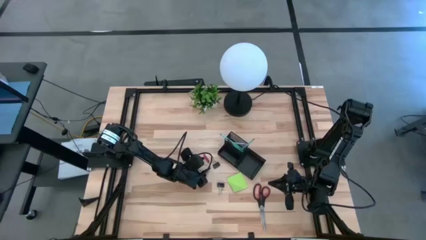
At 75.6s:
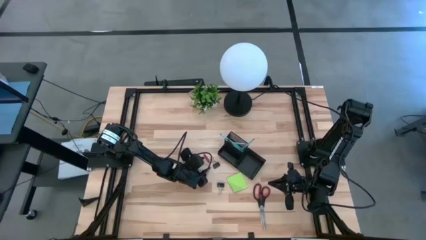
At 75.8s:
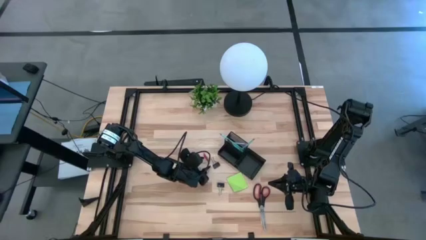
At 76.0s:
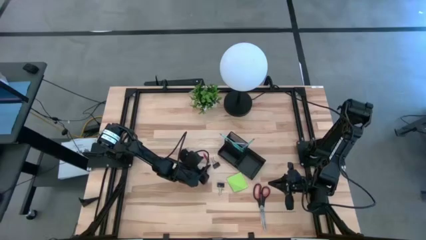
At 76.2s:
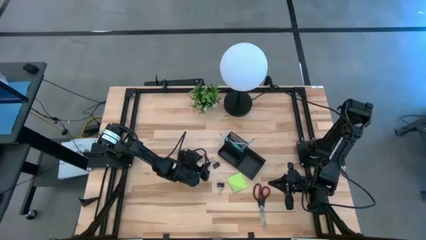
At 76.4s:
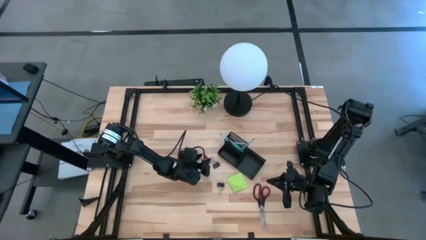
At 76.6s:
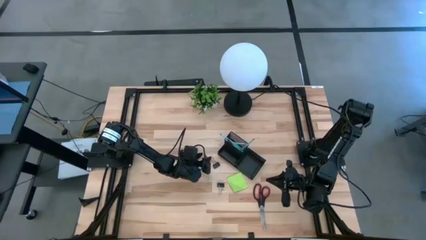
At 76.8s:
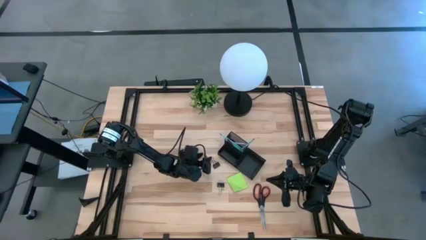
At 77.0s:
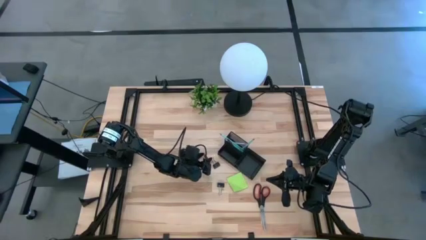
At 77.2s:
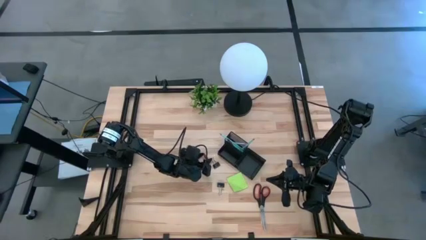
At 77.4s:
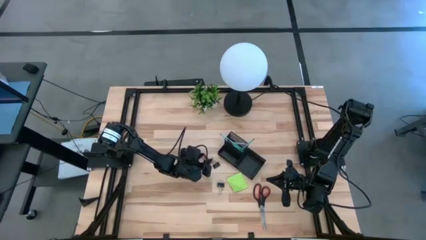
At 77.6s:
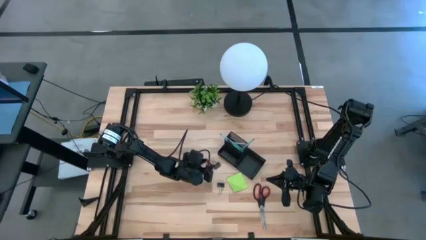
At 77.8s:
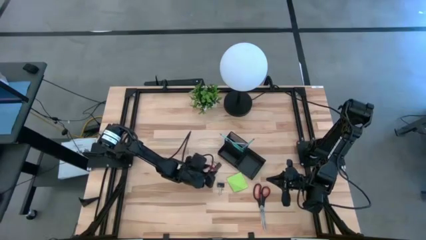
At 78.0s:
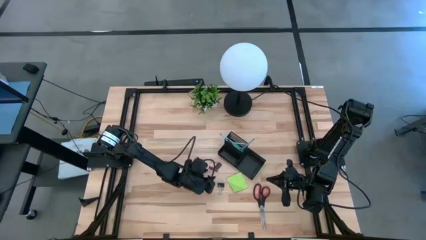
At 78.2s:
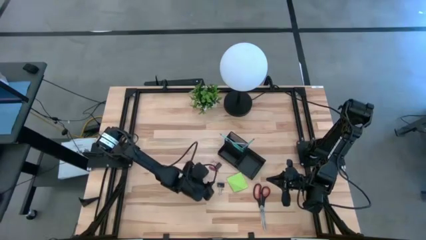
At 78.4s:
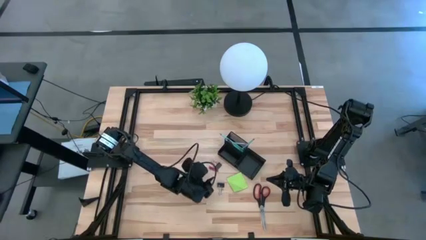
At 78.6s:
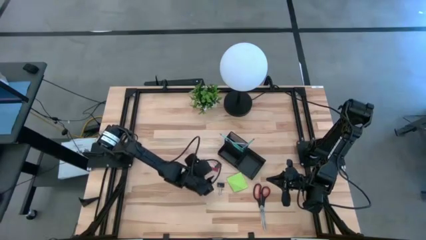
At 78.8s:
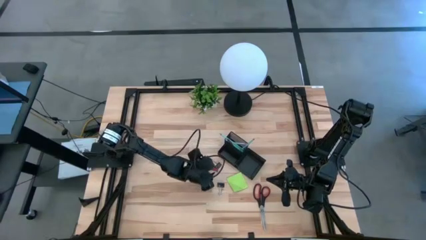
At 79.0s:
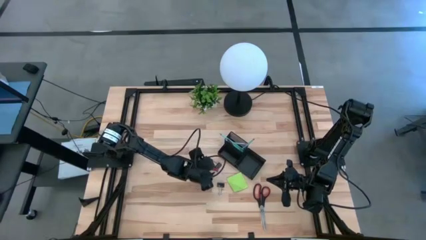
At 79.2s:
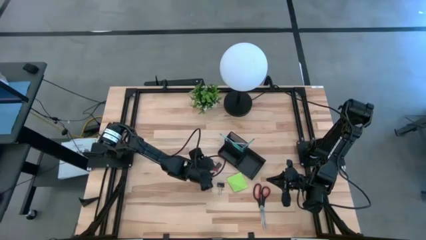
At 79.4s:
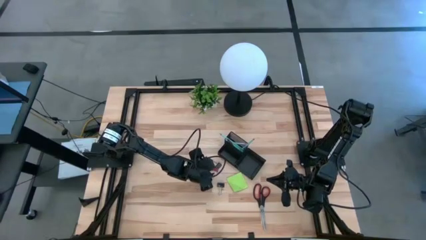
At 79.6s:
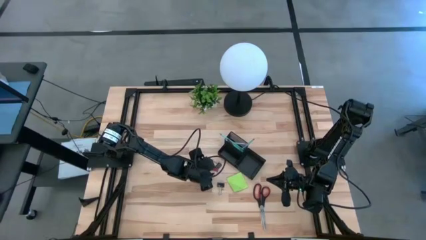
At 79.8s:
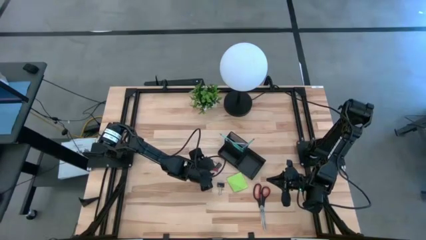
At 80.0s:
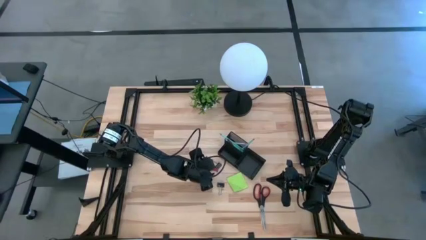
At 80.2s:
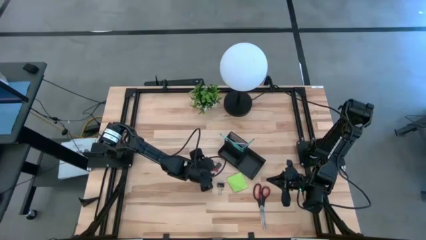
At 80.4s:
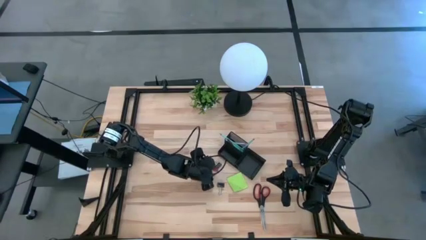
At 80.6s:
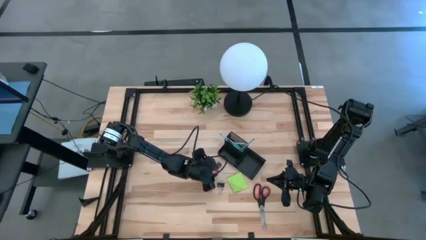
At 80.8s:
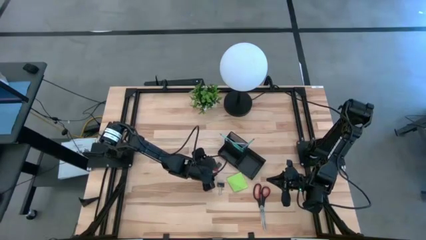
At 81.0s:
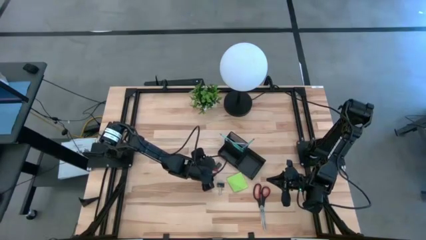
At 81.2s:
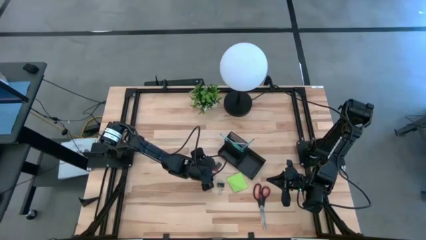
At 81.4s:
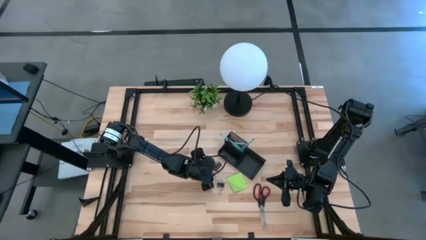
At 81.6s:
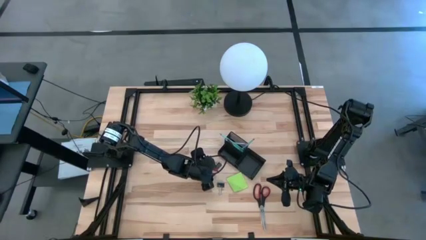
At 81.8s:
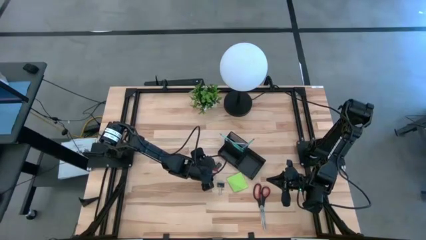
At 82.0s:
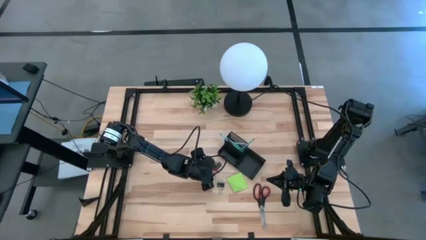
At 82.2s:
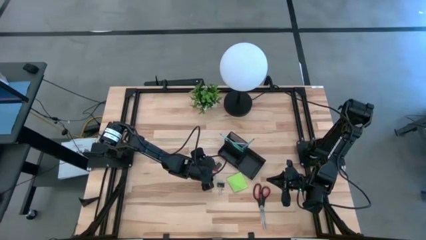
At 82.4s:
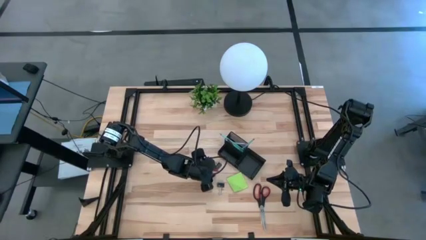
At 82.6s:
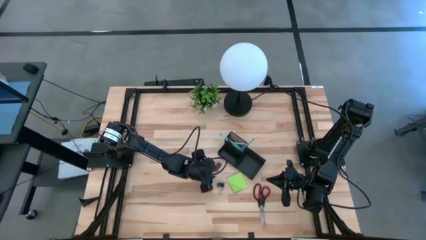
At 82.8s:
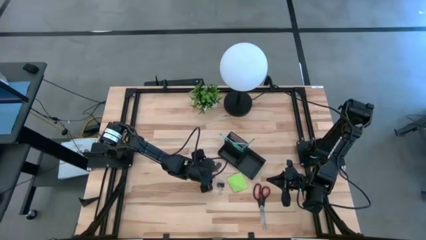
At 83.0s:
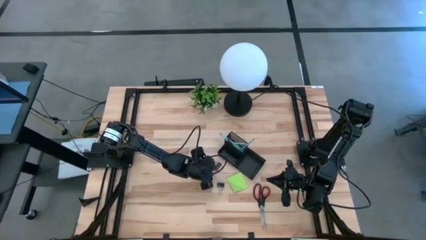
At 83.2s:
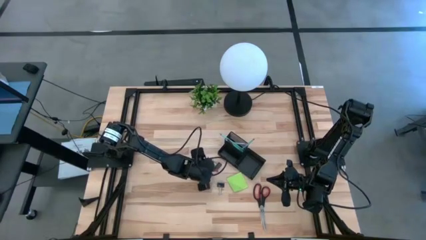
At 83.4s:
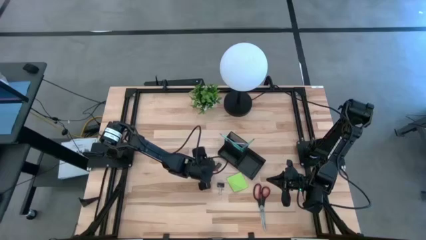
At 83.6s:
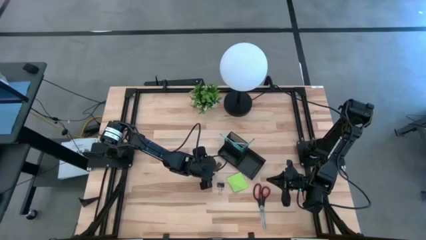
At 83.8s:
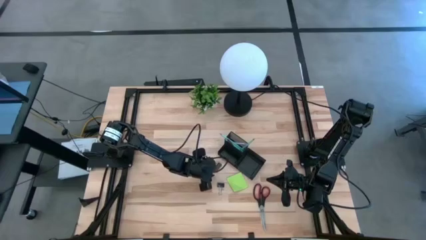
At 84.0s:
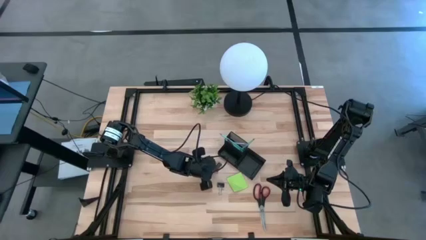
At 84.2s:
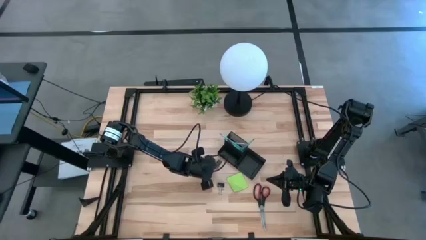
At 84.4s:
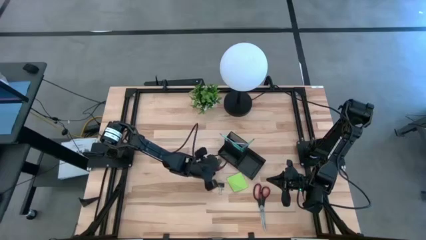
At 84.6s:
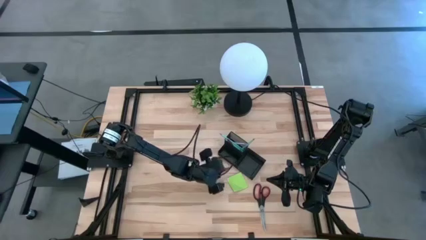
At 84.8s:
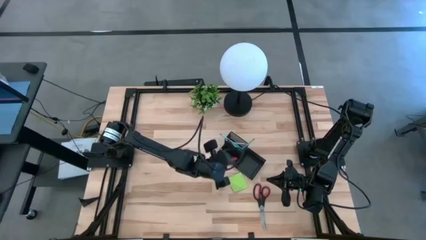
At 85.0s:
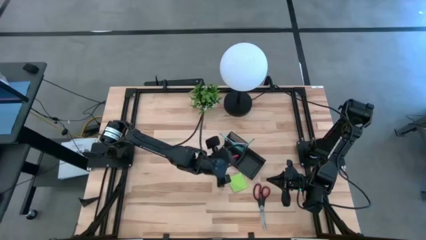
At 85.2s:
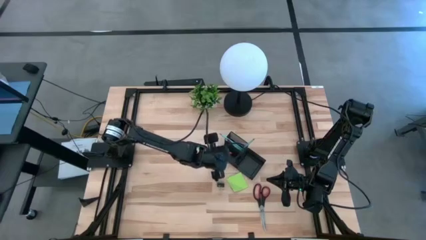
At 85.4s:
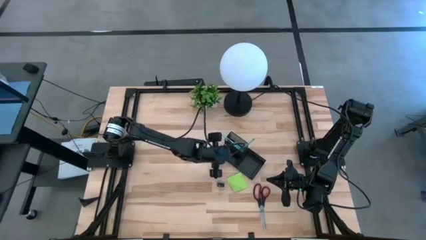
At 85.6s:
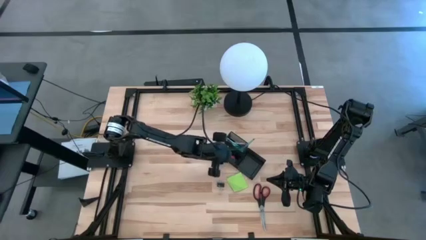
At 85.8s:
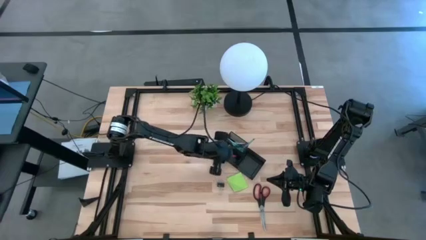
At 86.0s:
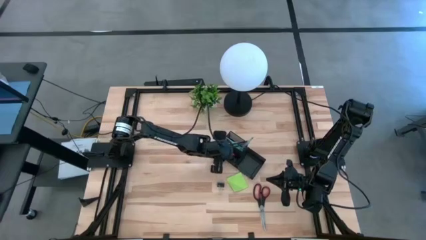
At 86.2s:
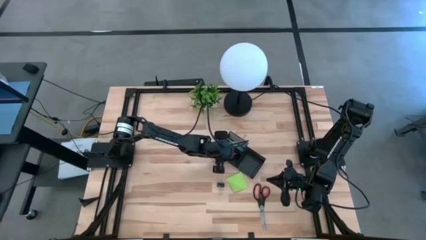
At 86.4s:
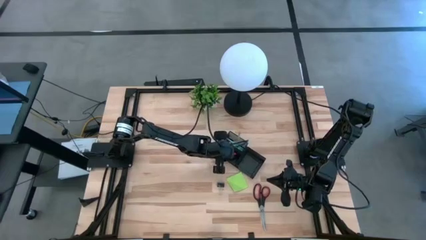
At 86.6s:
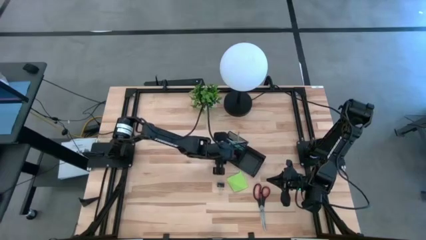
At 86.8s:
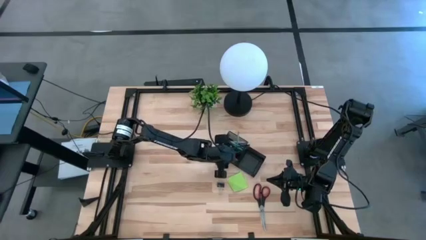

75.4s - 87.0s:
Task: Pick and place office supplies into organizer
Put the red eraser into the desk organizer
